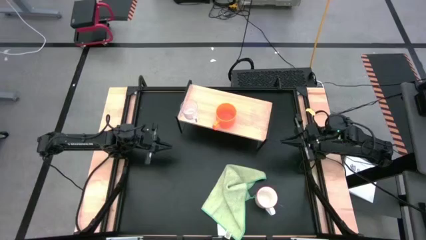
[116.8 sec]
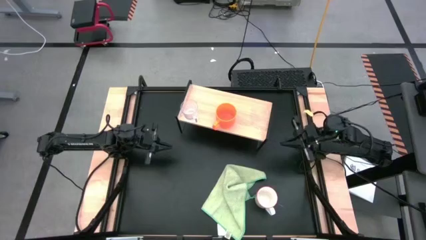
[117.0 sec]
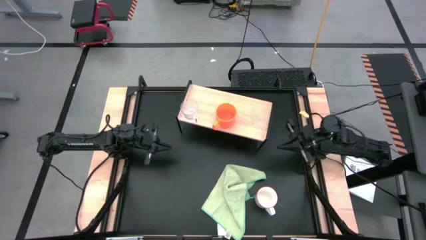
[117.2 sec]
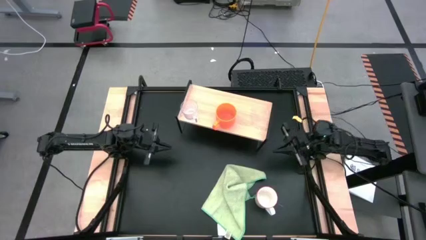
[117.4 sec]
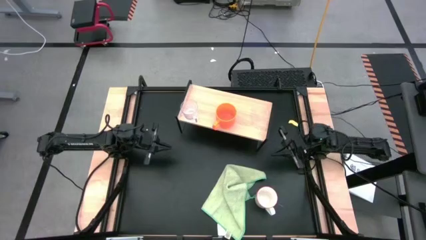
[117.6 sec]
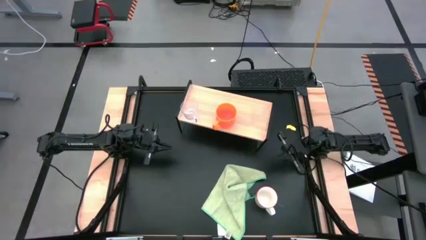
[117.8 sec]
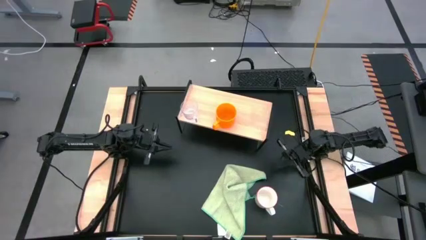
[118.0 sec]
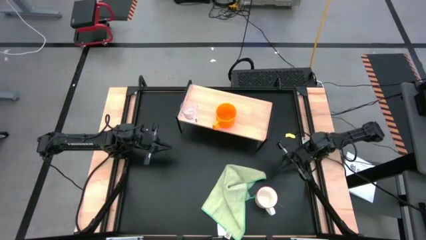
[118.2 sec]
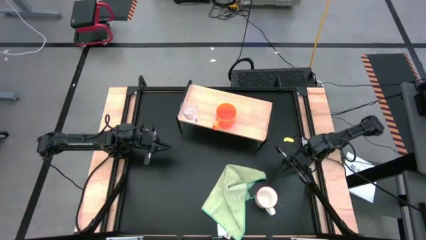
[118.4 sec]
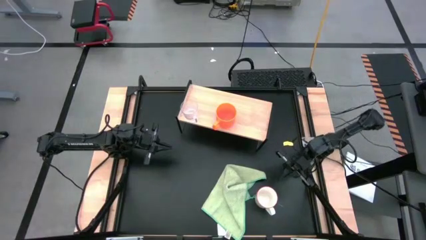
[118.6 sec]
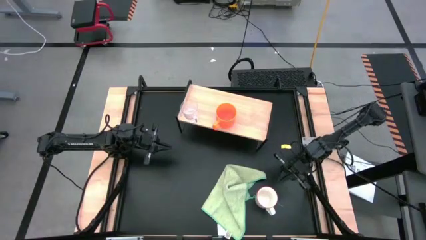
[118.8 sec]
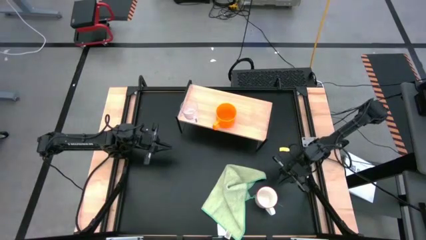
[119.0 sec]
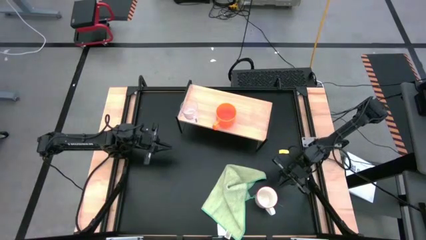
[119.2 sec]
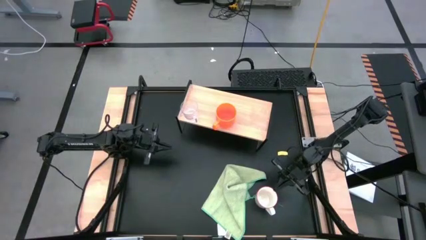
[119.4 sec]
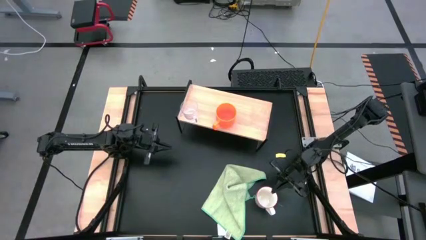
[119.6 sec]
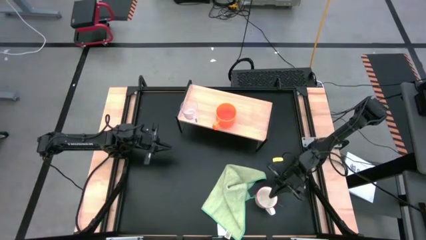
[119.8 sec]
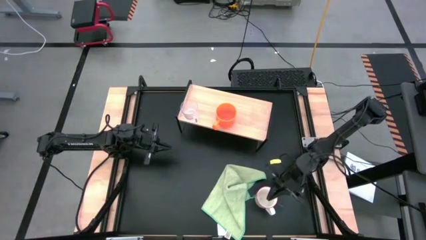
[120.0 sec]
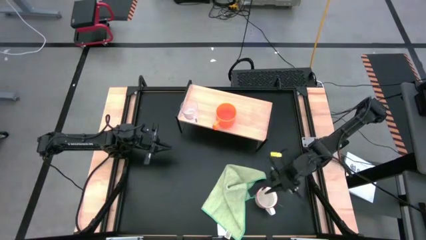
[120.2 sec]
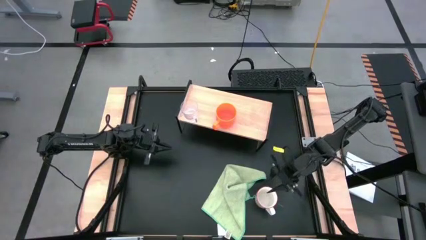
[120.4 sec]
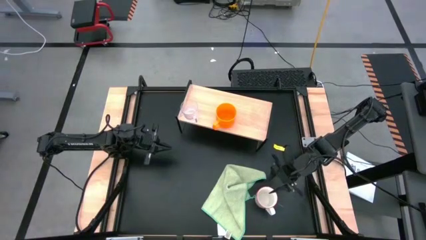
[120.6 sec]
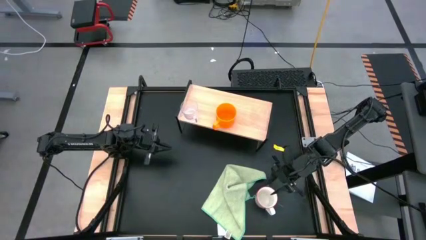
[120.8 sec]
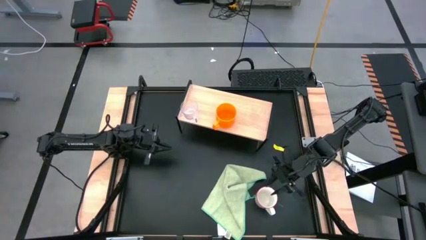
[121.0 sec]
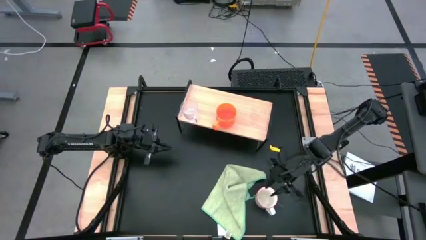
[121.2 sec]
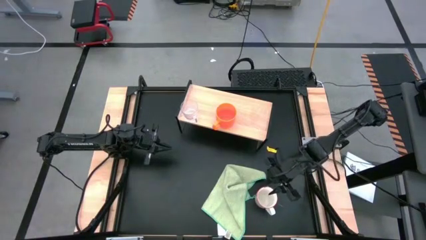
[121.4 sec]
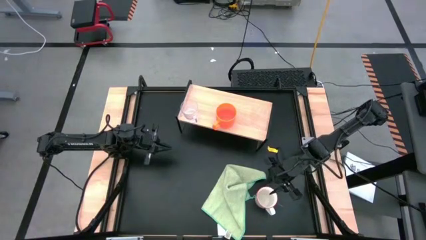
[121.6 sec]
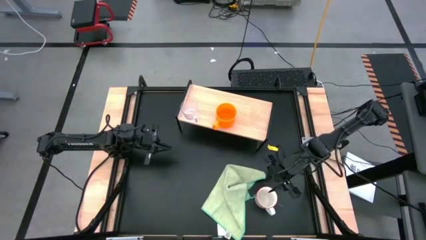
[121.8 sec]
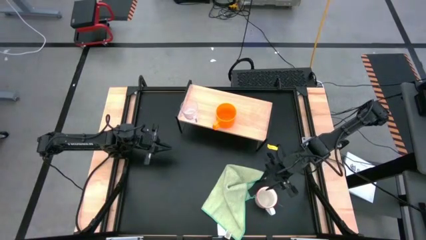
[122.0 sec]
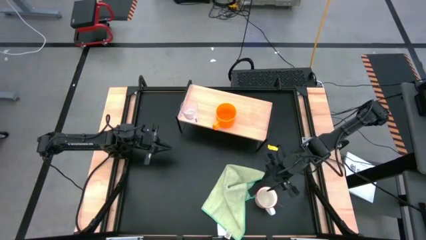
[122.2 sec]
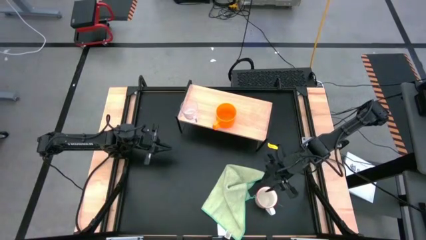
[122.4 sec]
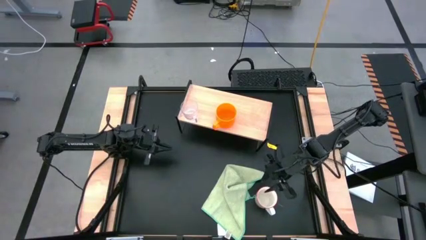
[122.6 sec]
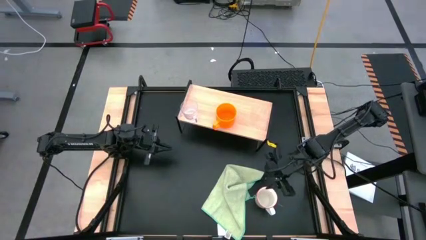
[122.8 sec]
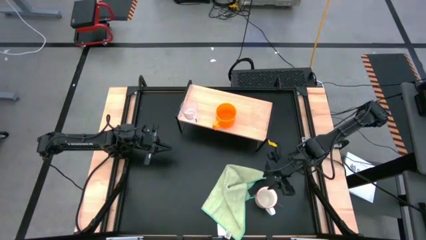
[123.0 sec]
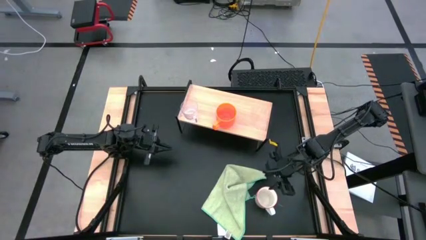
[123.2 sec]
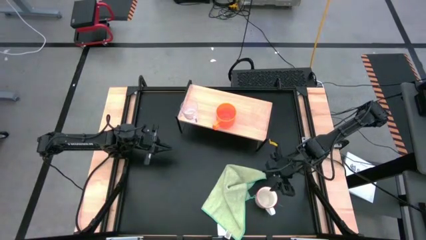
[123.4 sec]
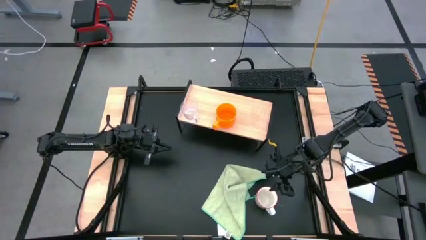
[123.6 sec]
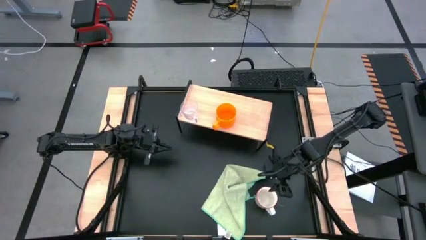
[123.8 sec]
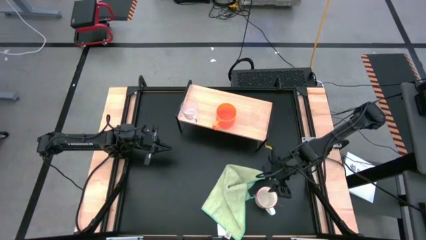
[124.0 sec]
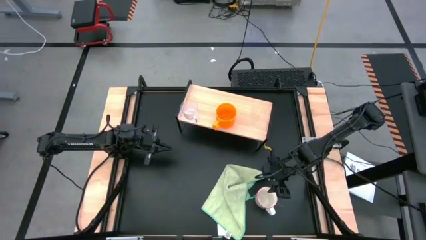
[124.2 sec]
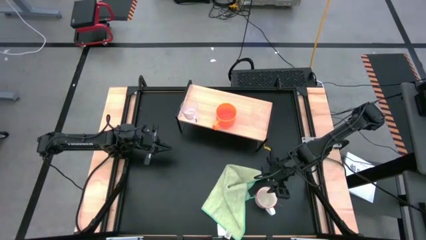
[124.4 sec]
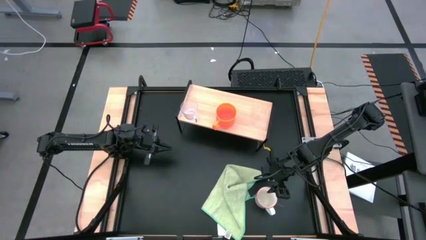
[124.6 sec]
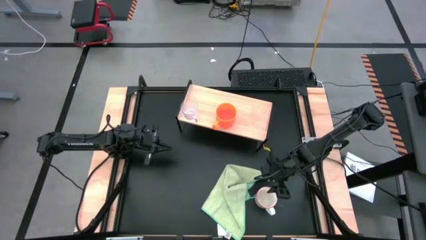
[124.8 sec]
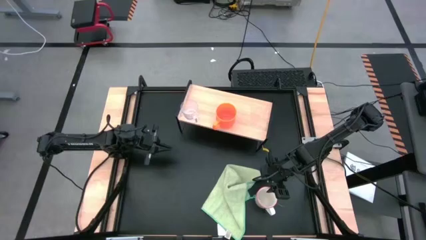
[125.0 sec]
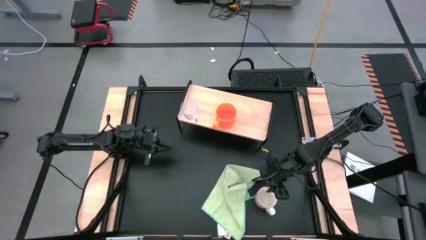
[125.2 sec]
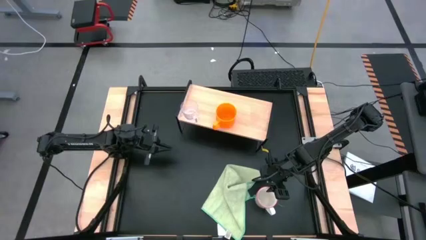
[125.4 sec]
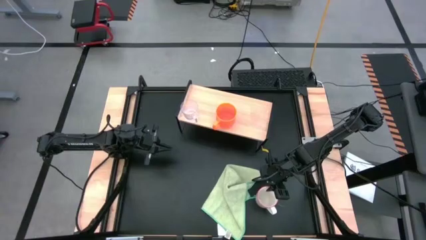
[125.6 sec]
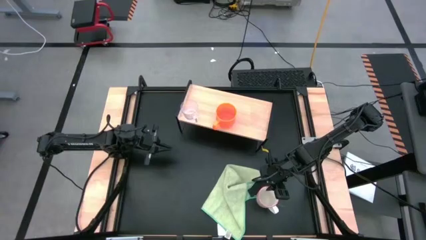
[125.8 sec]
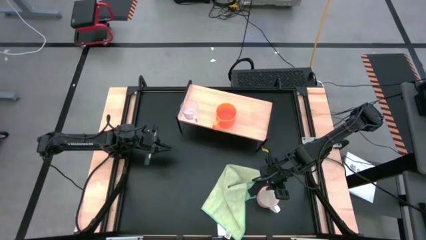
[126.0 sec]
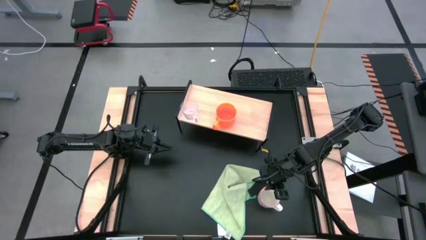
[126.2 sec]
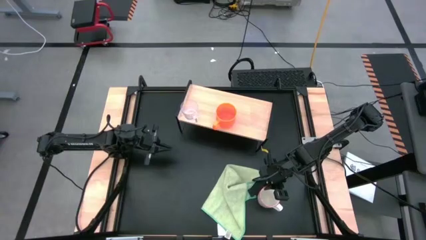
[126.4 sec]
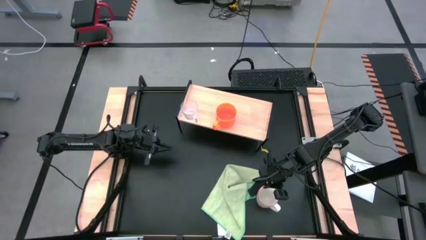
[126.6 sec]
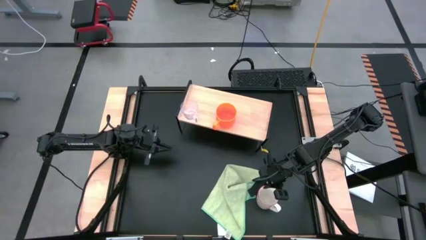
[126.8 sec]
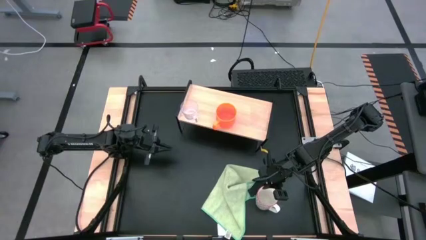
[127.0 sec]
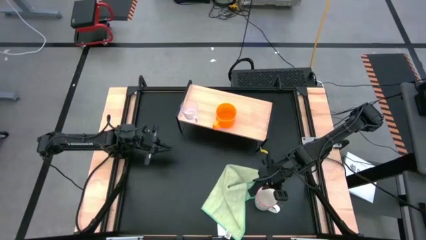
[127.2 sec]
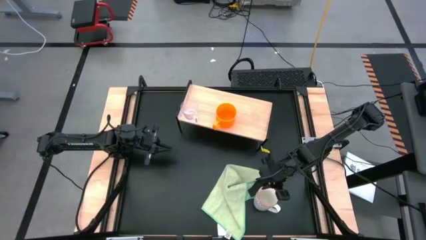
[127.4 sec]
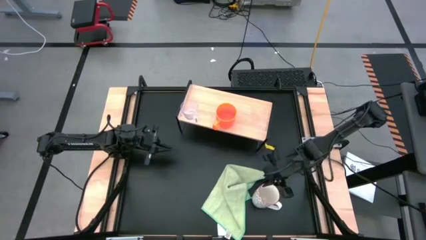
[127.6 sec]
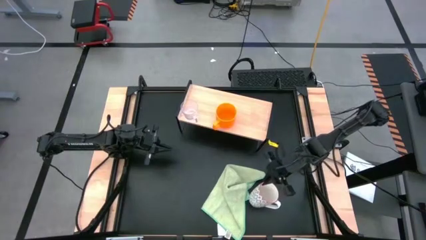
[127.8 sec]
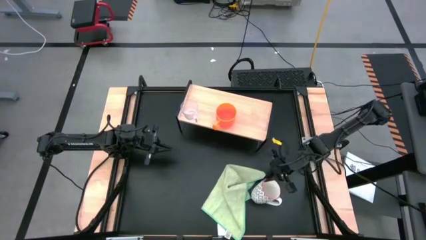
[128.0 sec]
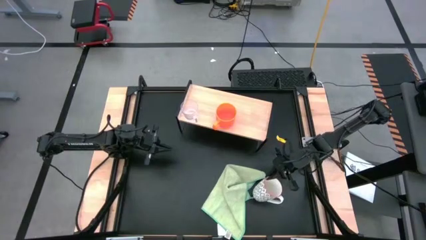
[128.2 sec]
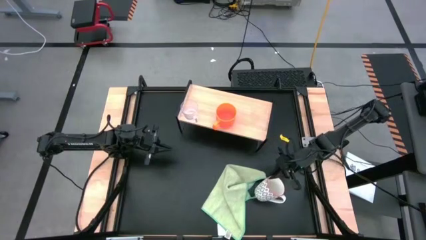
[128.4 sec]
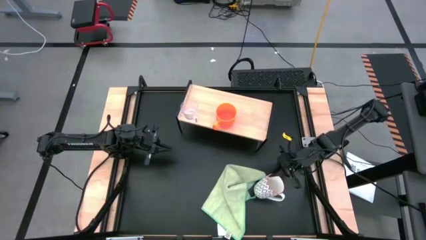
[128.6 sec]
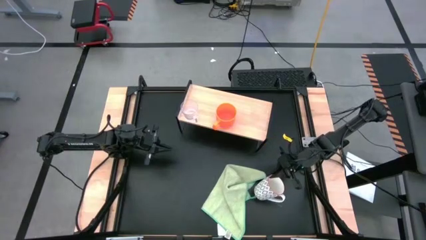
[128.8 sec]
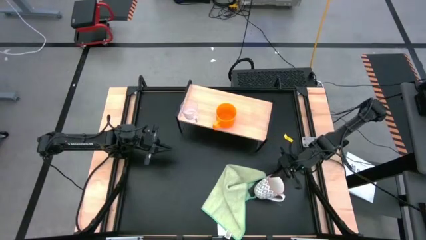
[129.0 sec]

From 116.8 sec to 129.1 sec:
Task: Stack small to large cups/mugs on shelf
Put the patterned mug on the shelf

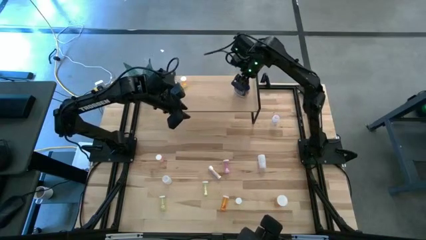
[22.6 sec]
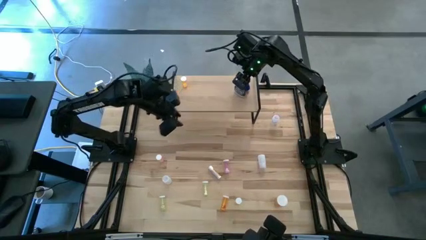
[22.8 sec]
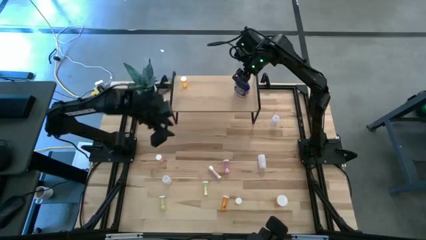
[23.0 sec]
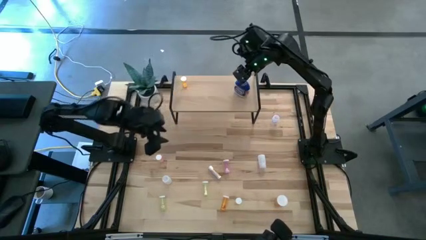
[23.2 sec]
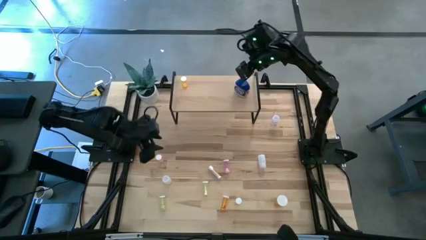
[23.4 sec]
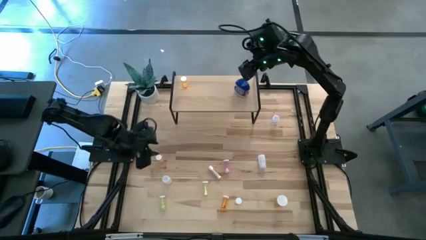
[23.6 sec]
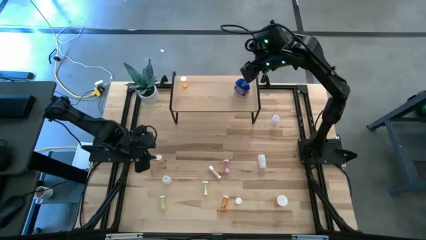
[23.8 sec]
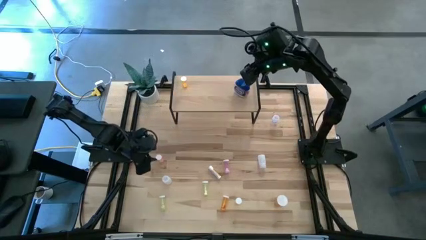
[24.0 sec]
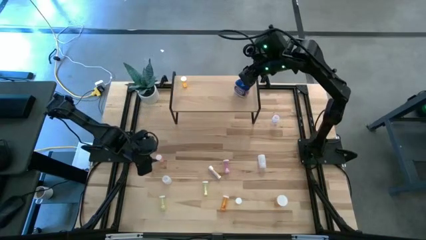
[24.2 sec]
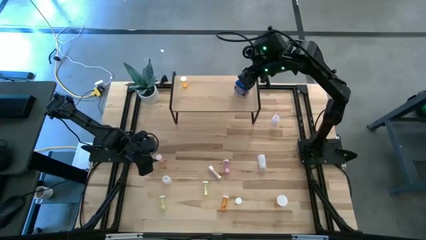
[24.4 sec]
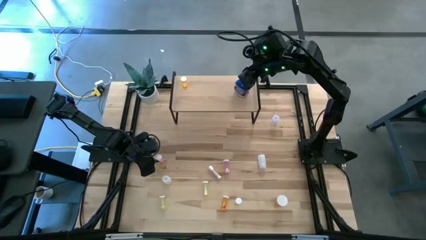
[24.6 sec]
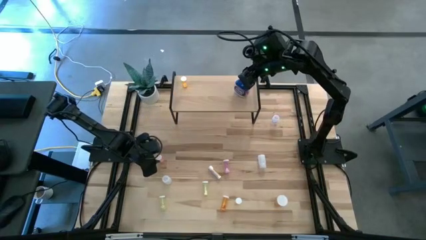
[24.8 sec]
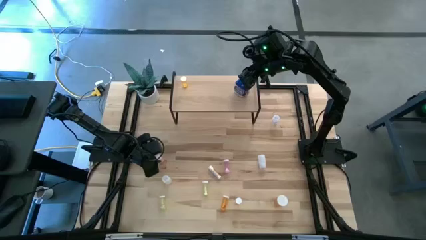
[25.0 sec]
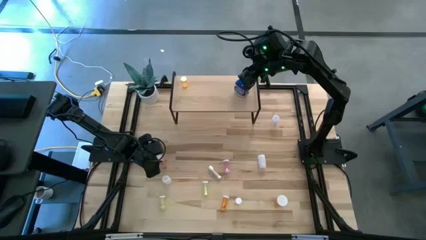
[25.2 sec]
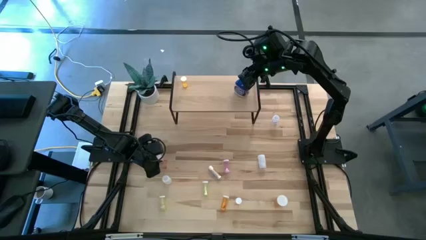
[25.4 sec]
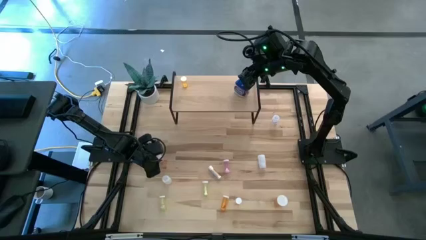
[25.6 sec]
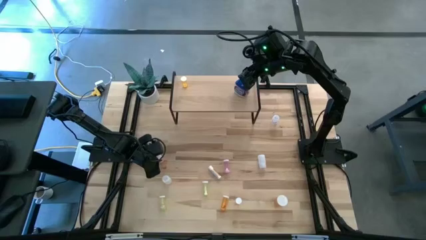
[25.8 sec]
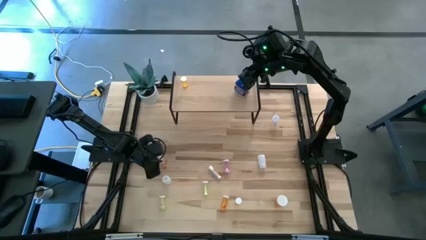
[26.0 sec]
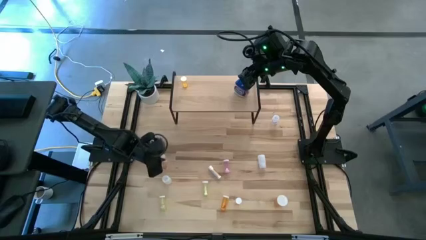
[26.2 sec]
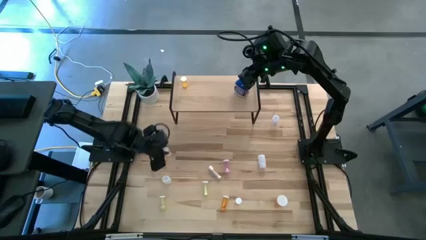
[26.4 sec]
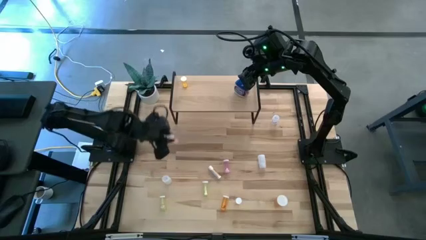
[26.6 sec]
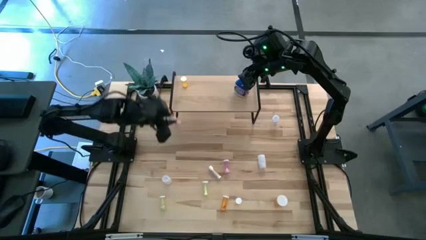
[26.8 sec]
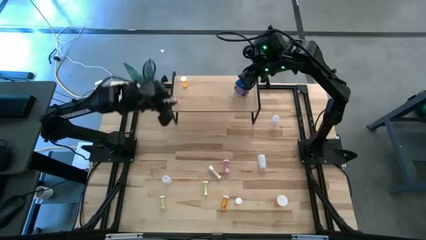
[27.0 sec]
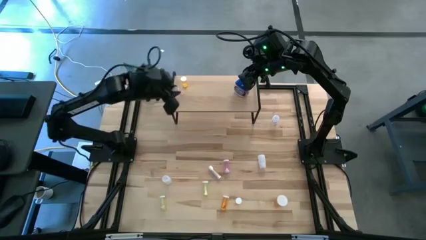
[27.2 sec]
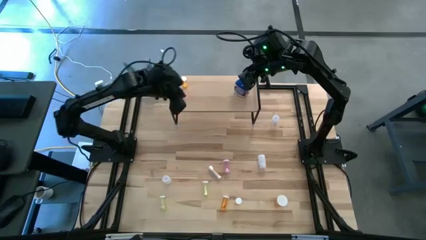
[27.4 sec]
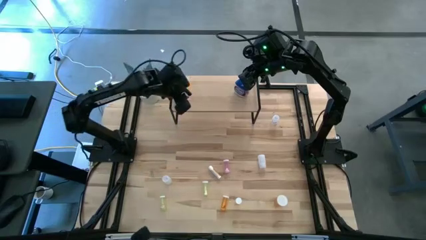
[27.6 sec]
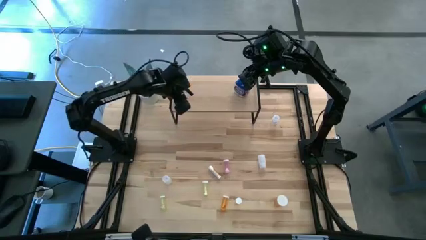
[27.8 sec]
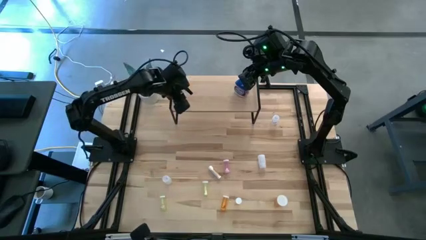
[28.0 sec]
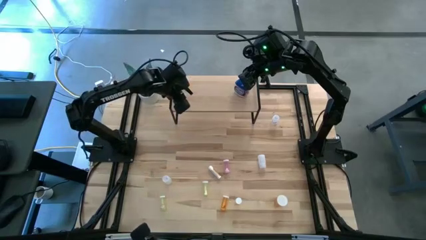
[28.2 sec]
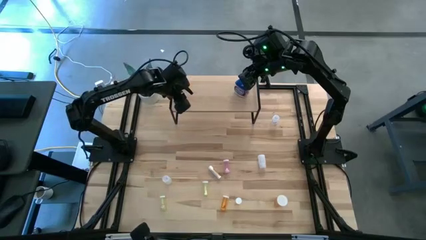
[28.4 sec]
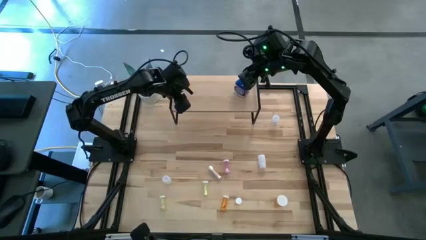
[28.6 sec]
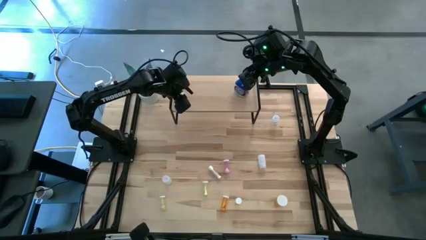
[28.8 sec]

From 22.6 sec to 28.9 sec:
Task: Pick and place medicine bottles onto shelf by color
Put the left pink pill bottle on the shelf
